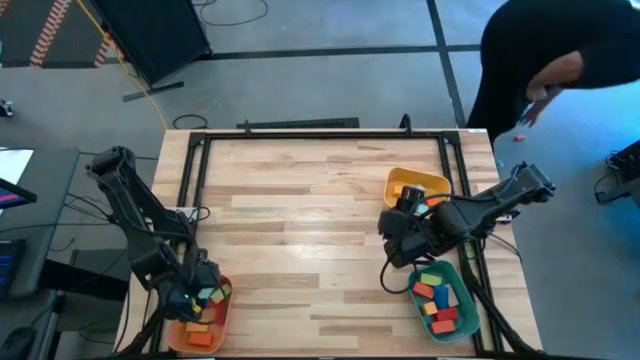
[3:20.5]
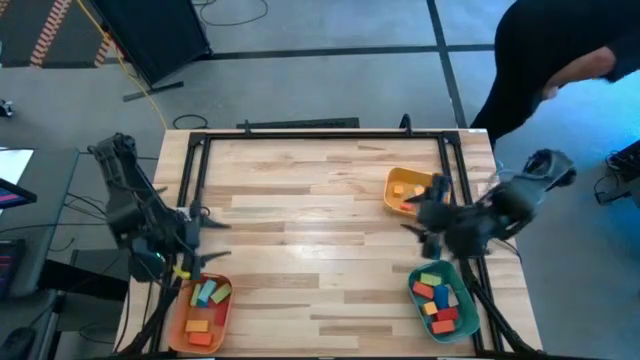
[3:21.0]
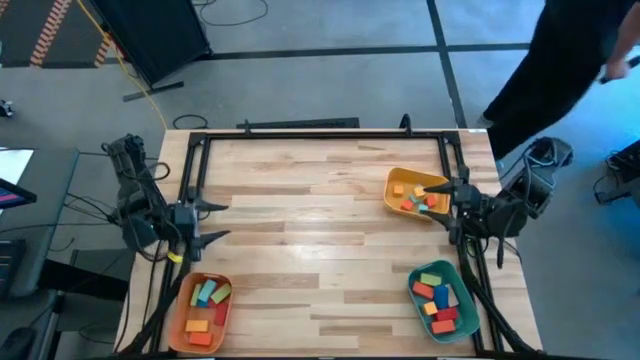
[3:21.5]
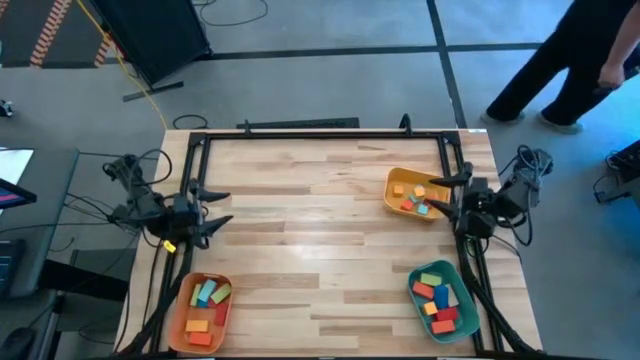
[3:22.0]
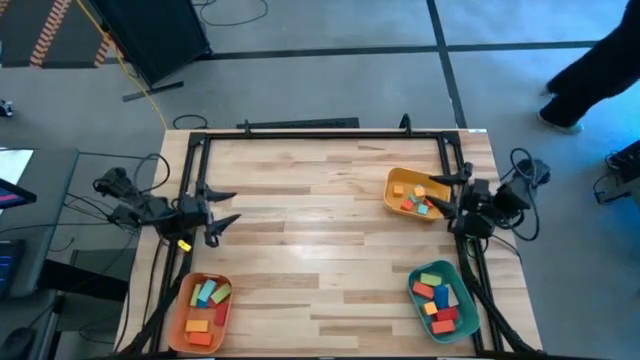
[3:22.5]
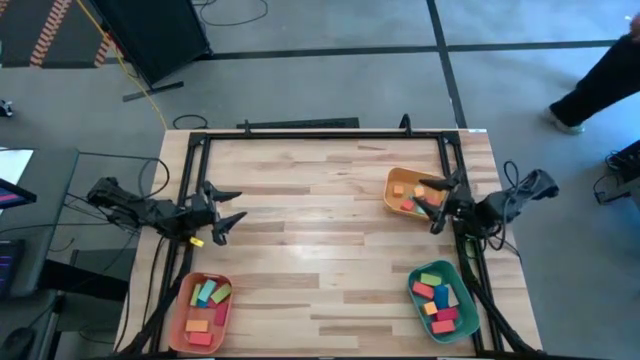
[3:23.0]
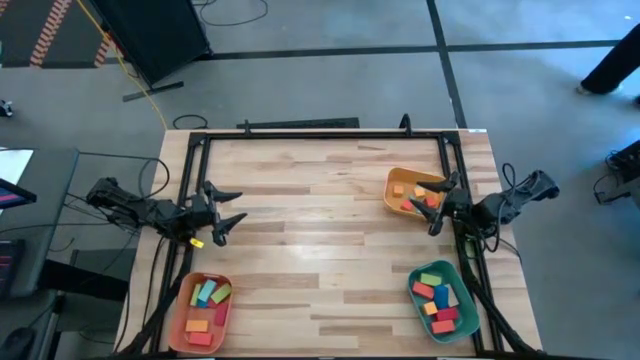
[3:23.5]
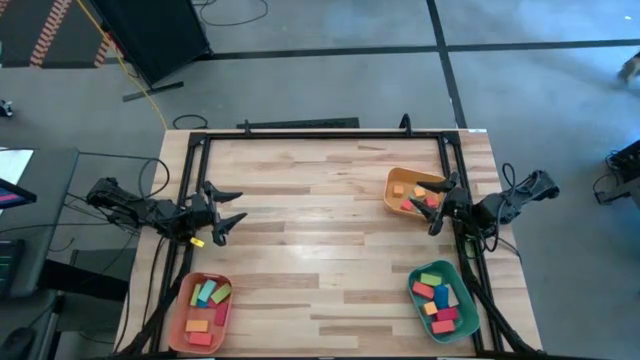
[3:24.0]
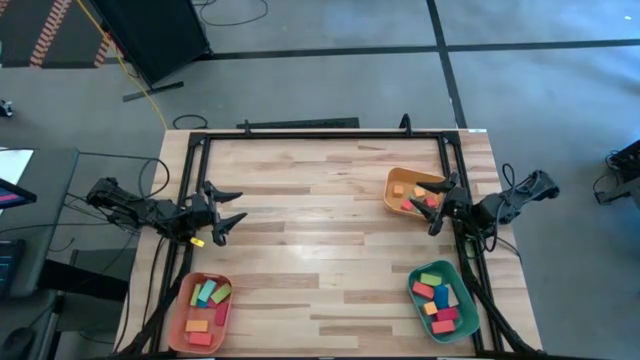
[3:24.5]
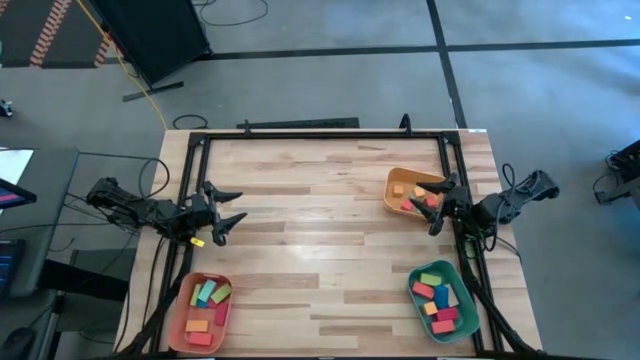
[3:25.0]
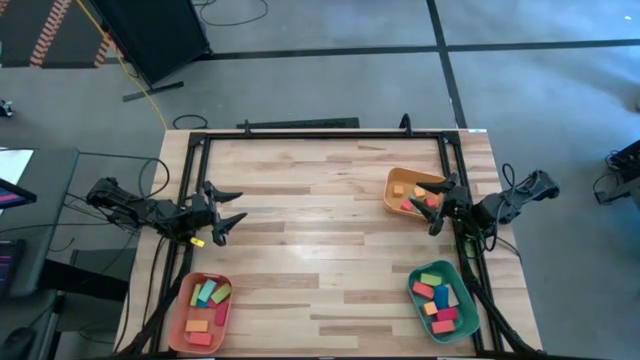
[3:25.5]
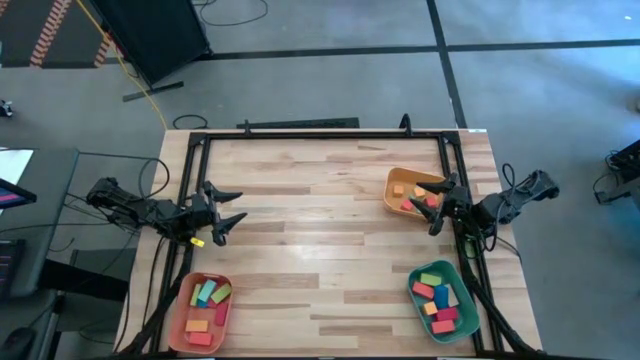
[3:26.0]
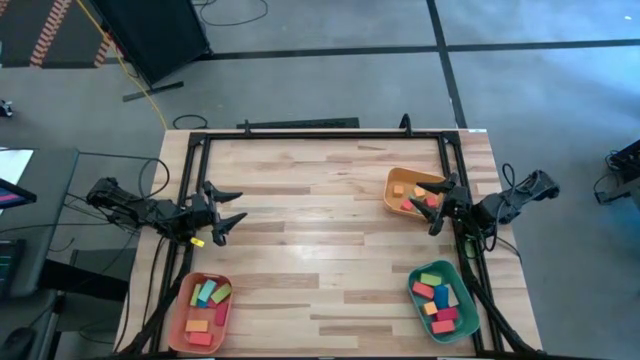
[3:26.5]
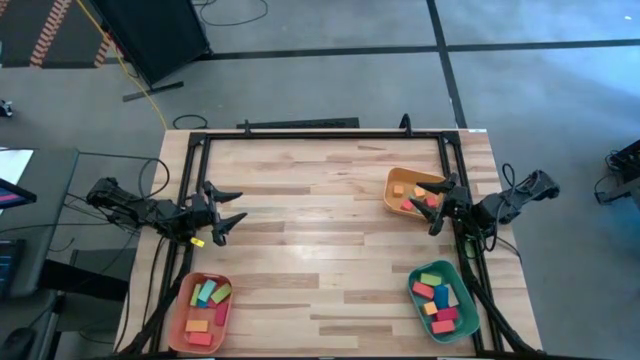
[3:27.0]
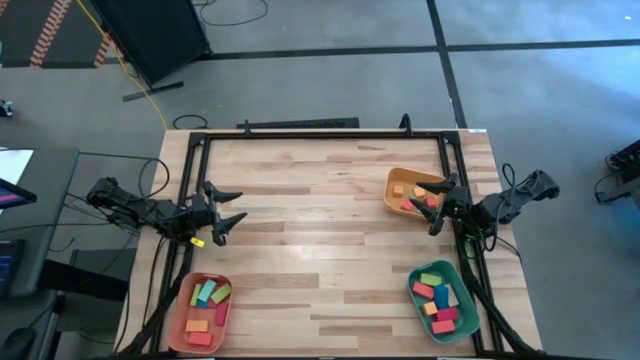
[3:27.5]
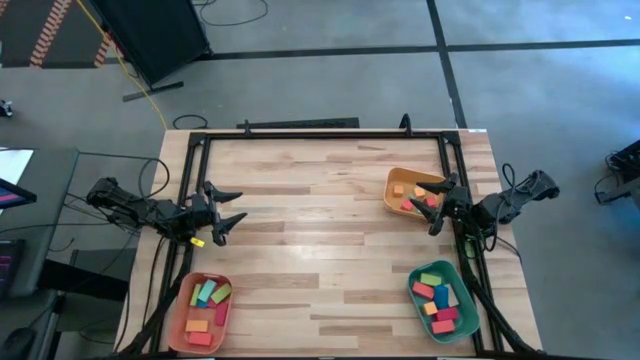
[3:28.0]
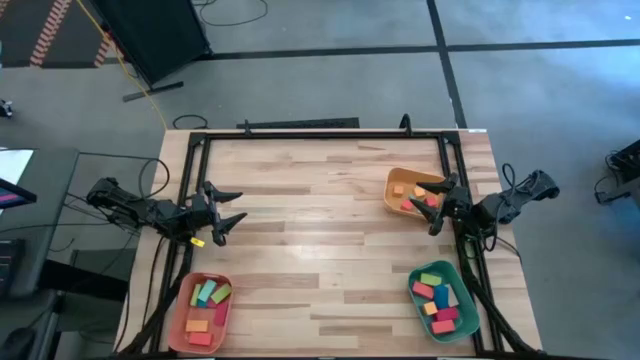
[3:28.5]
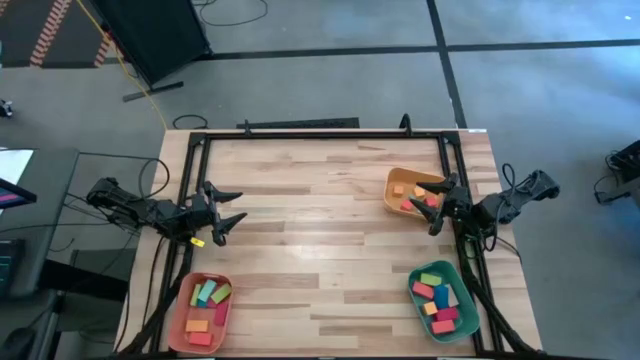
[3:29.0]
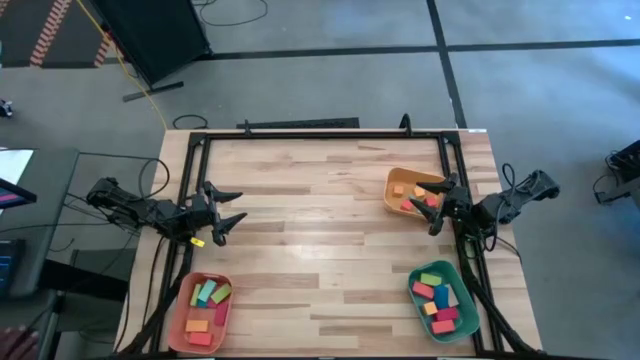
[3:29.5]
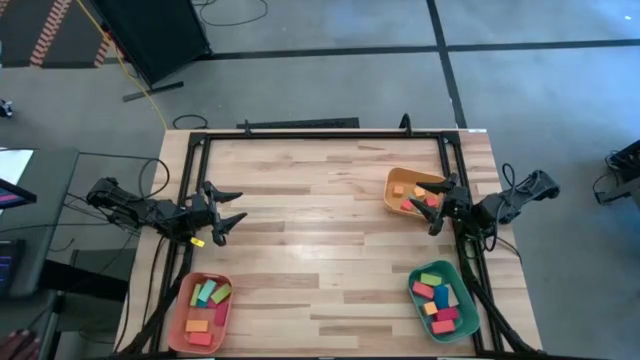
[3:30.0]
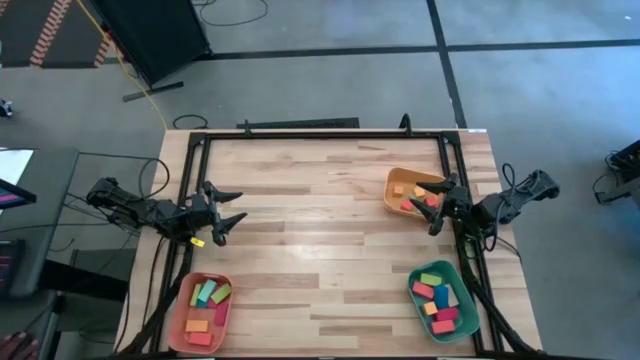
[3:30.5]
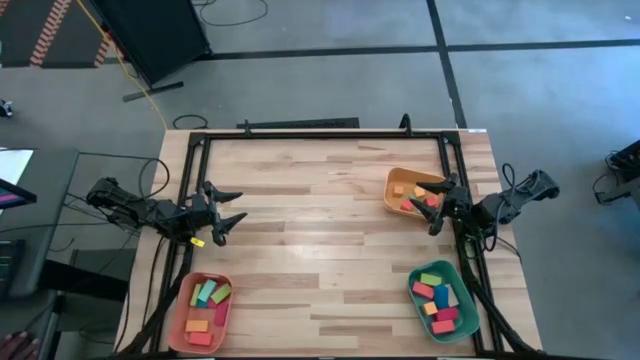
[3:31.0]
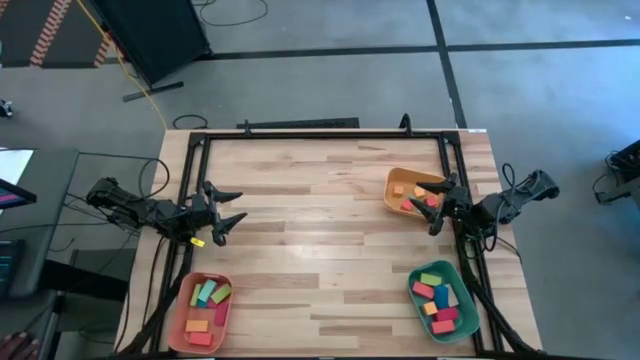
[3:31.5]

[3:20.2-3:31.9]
Task: Sort blocks by size
Return to Home Position

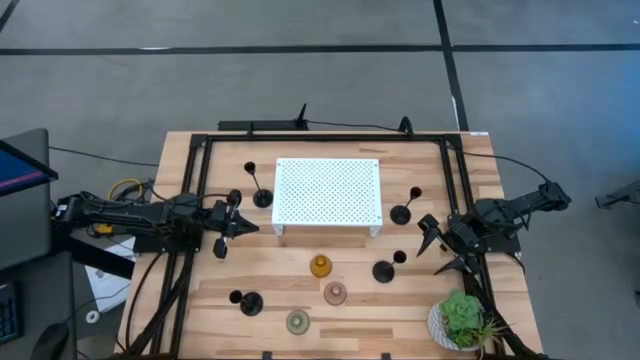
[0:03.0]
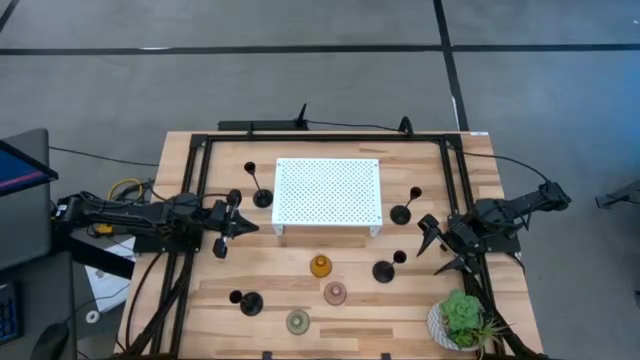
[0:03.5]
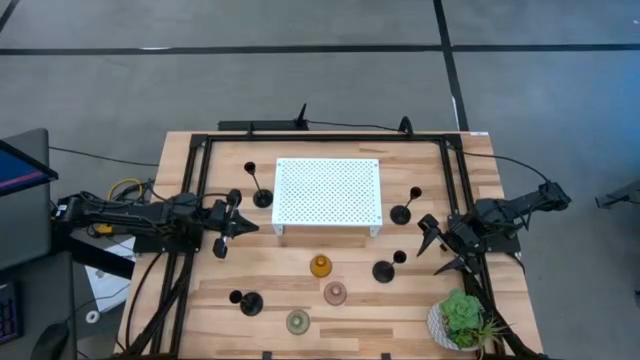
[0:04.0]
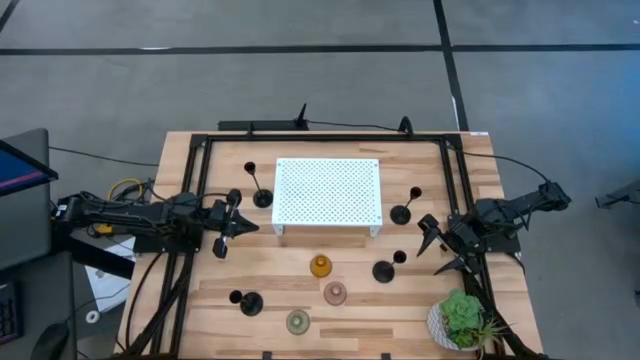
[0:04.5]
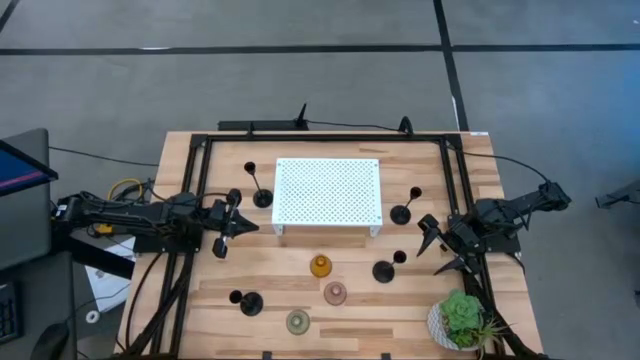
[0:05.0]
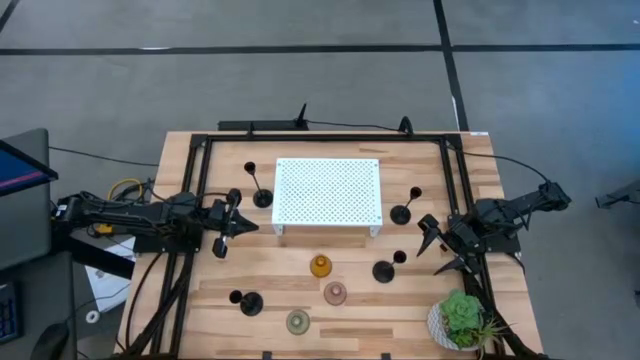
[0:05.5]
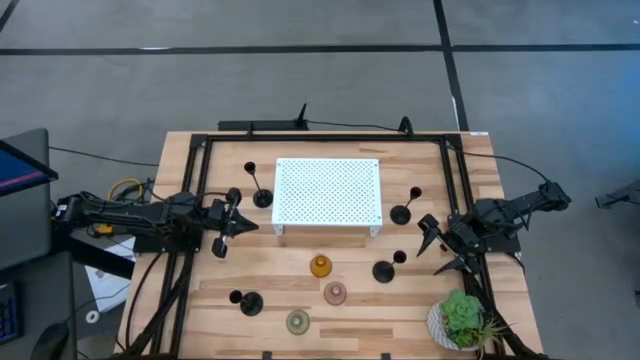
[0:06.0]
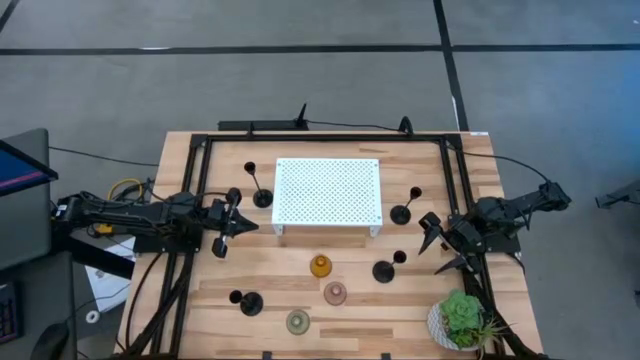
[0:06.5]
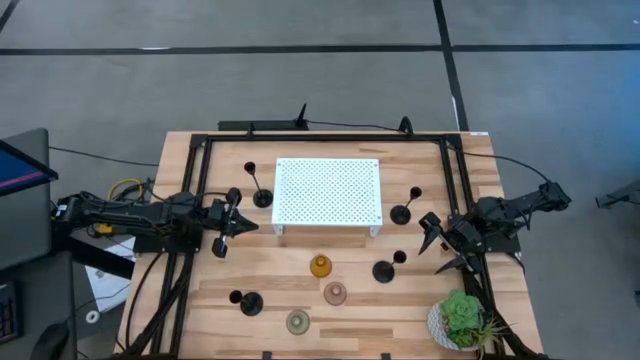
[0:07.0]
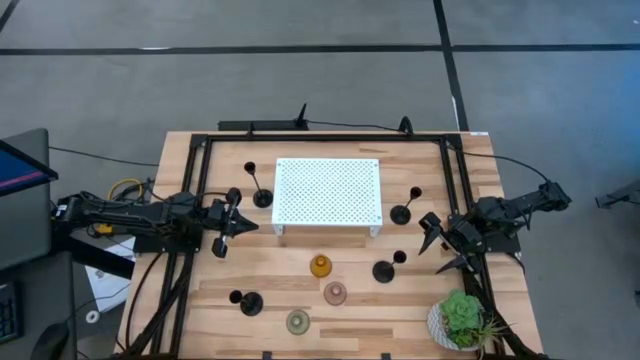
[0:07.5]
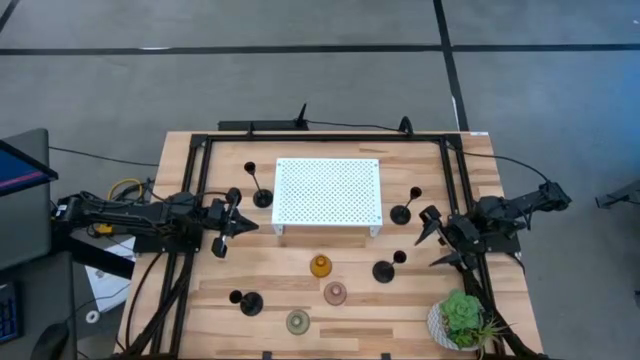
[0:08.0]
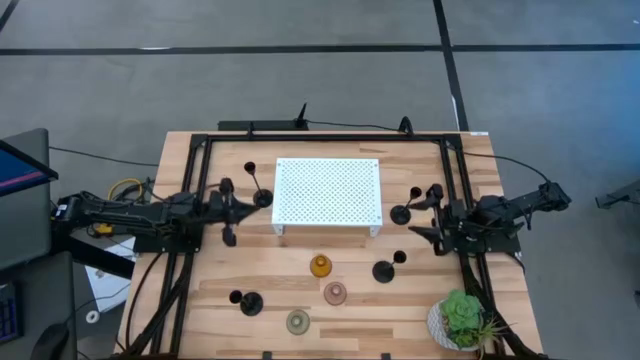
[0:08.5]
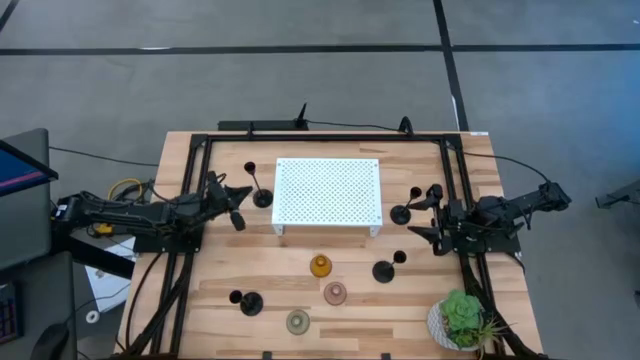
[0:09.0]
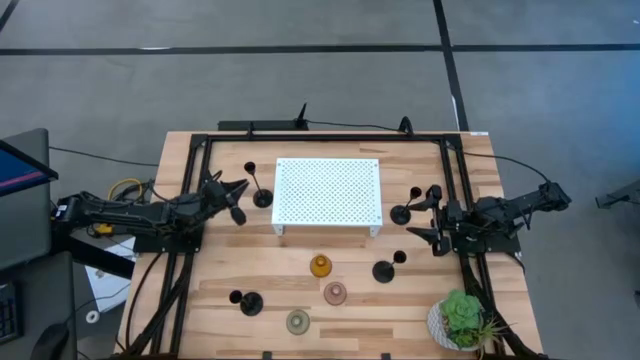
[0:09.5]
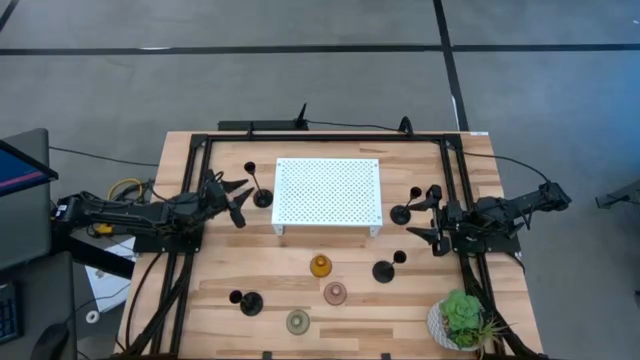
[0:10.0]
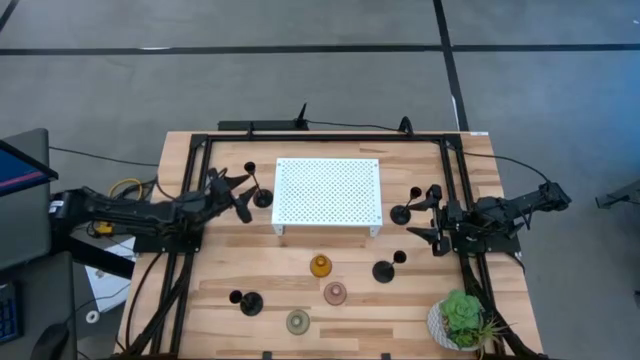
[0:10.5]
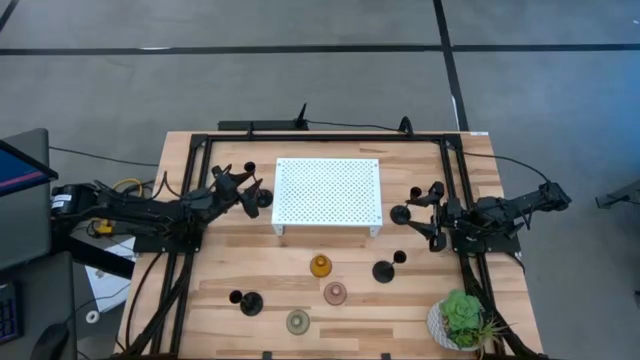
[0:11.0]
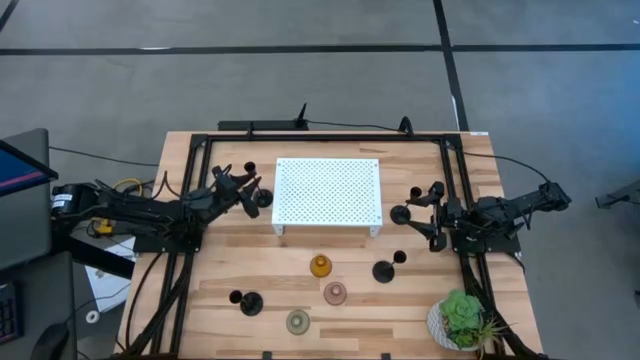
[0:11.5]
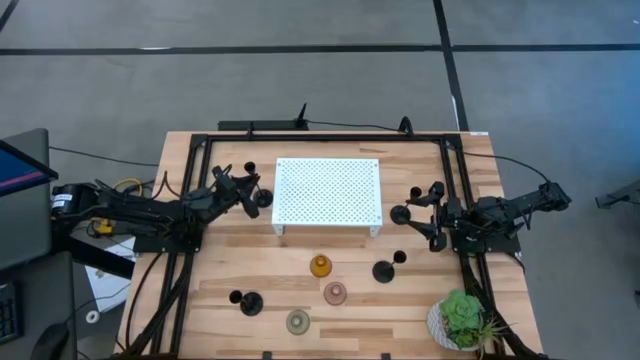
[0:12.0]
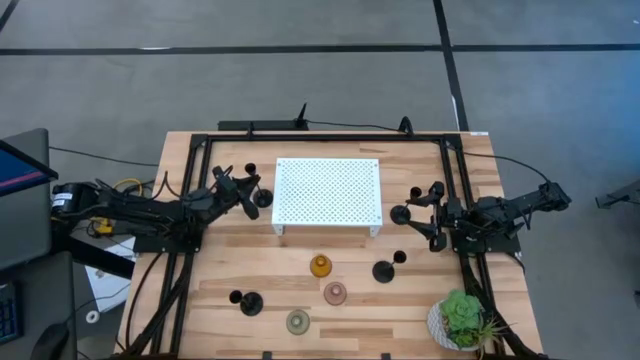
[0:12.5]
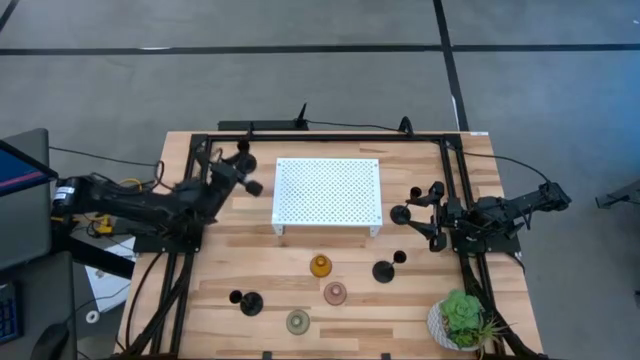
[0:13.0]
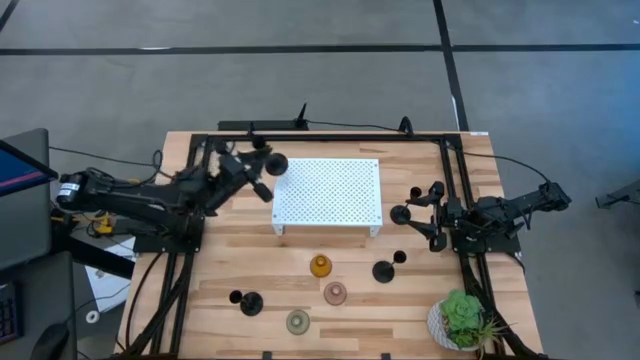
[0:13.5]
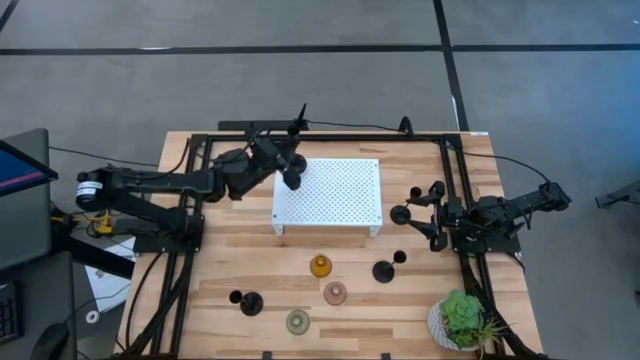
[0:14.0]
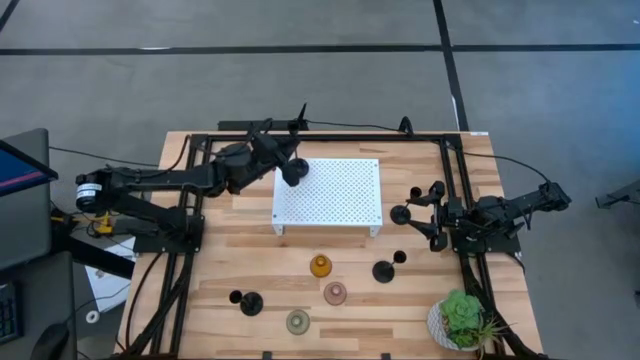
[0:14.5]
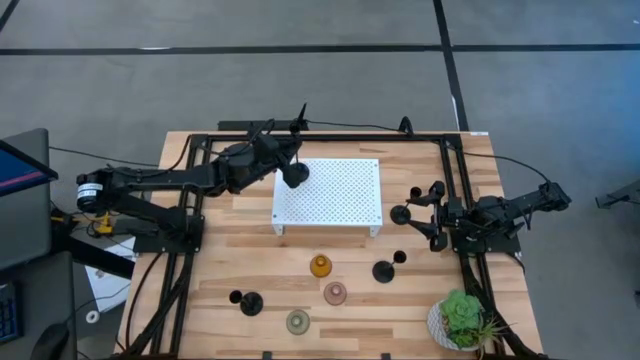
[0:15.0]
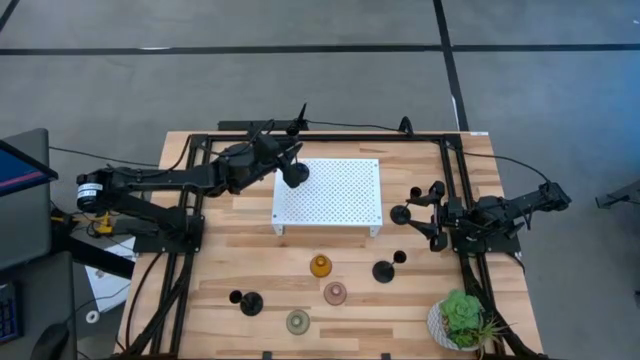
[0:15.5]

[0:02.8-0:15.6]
Task: Pick & Place candle stick holders
Put the black candle holder on the shelf
